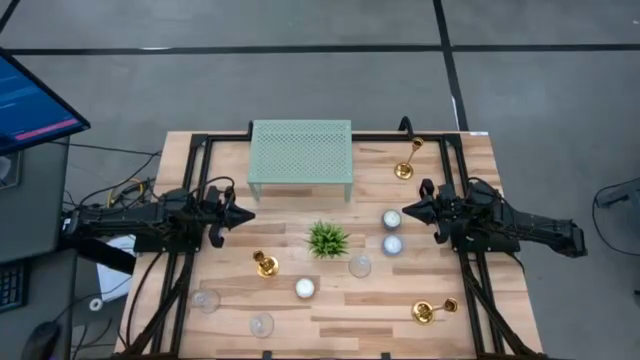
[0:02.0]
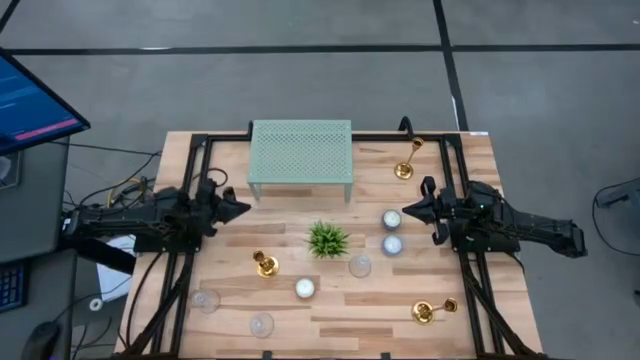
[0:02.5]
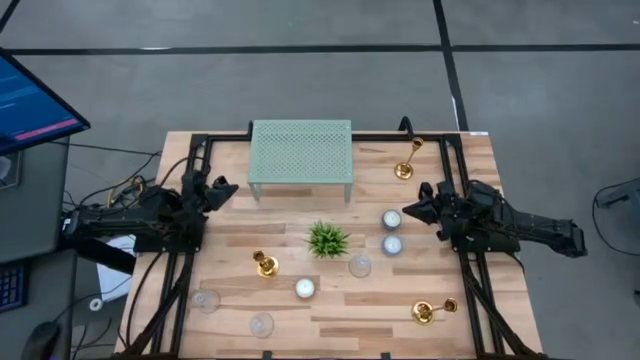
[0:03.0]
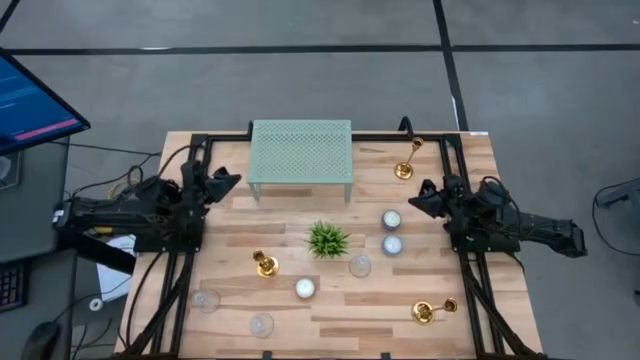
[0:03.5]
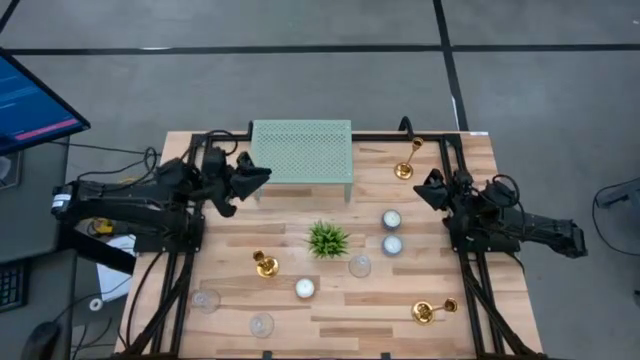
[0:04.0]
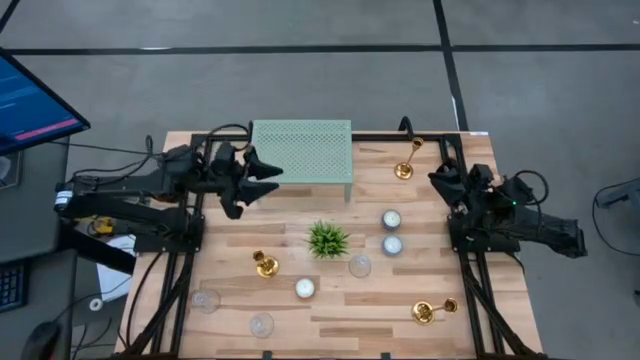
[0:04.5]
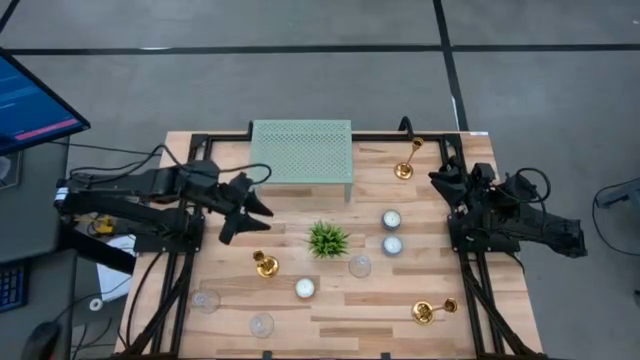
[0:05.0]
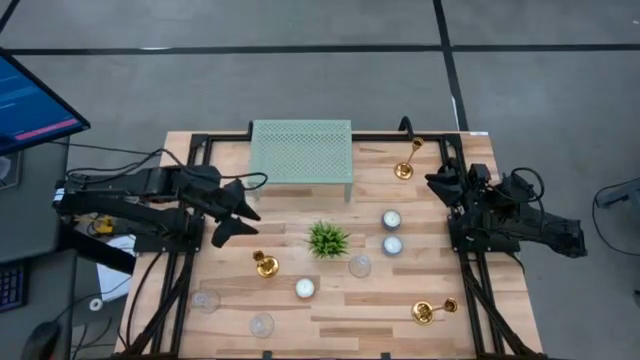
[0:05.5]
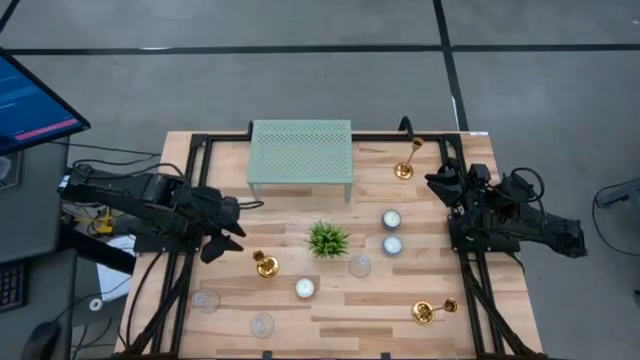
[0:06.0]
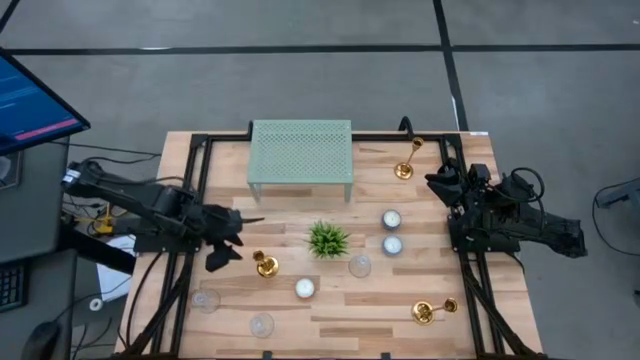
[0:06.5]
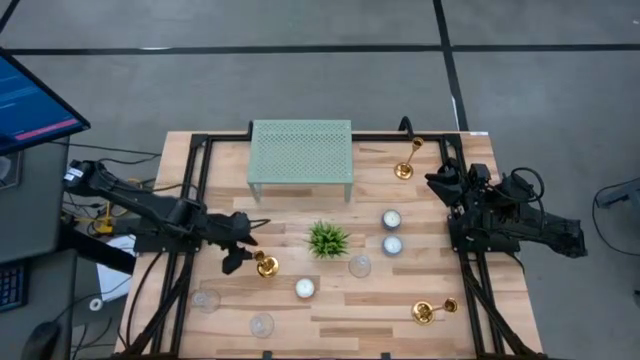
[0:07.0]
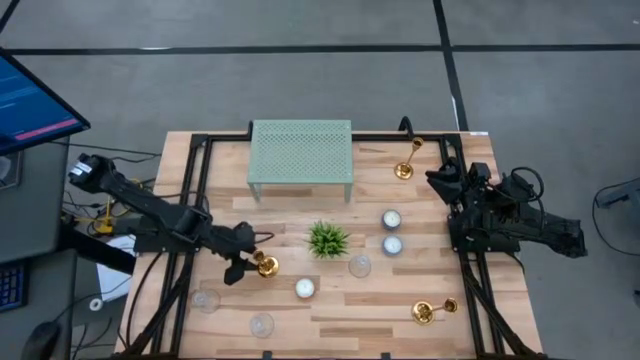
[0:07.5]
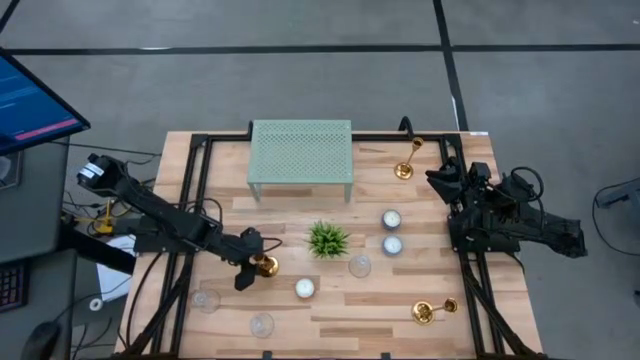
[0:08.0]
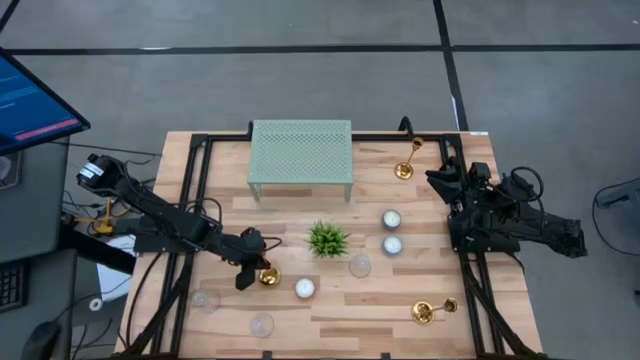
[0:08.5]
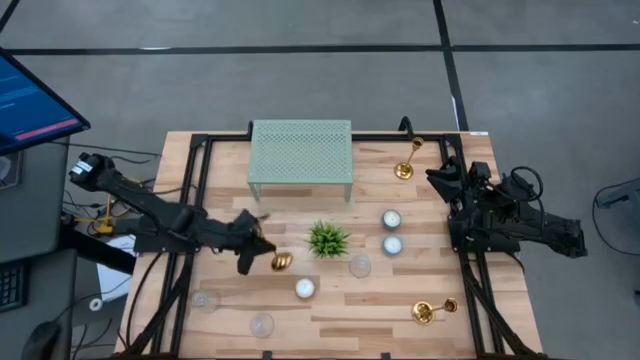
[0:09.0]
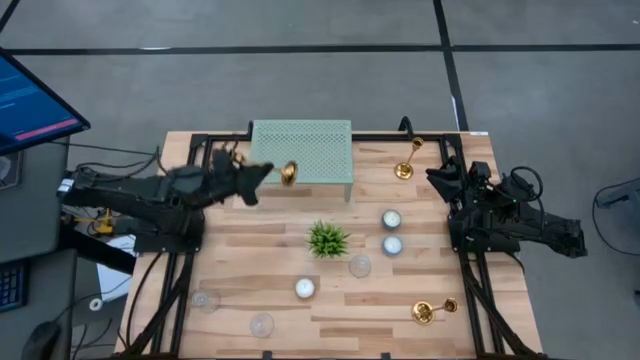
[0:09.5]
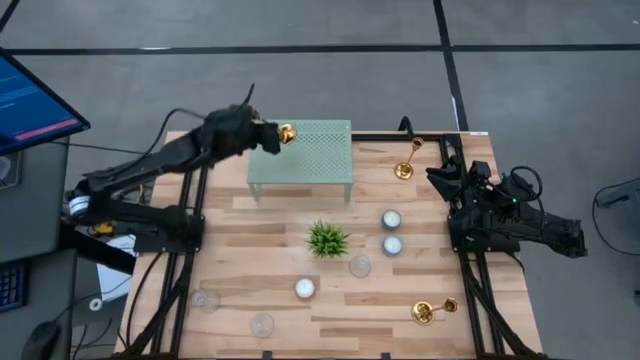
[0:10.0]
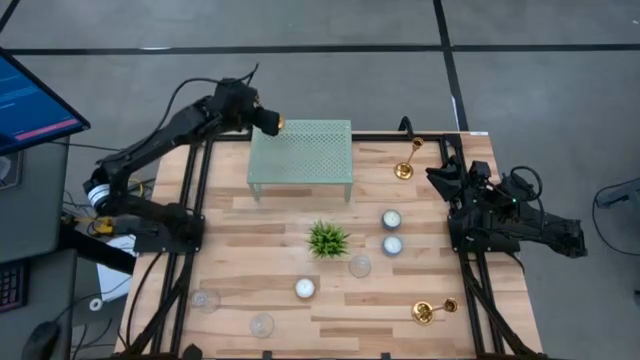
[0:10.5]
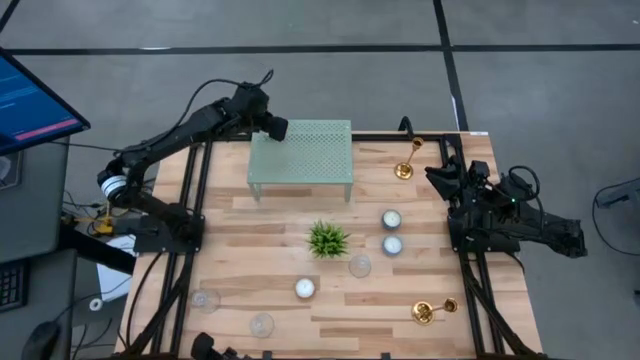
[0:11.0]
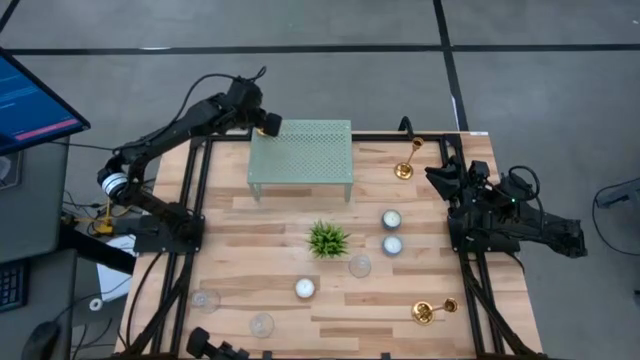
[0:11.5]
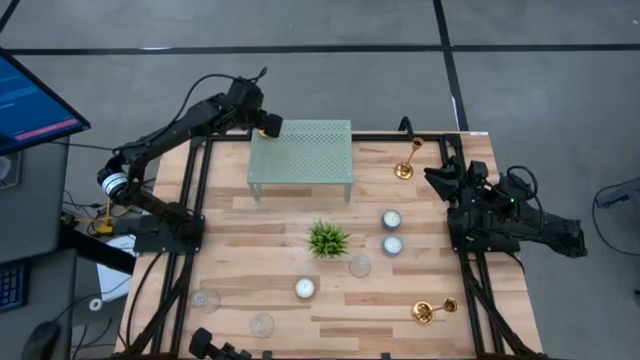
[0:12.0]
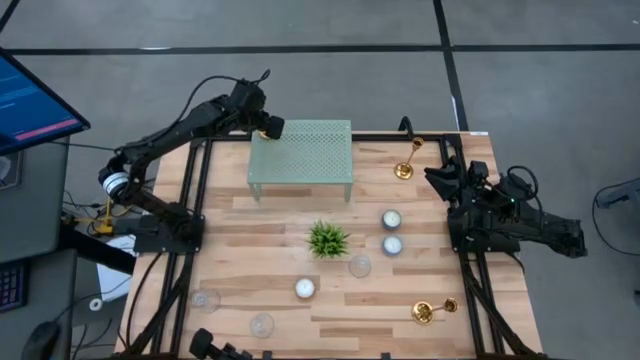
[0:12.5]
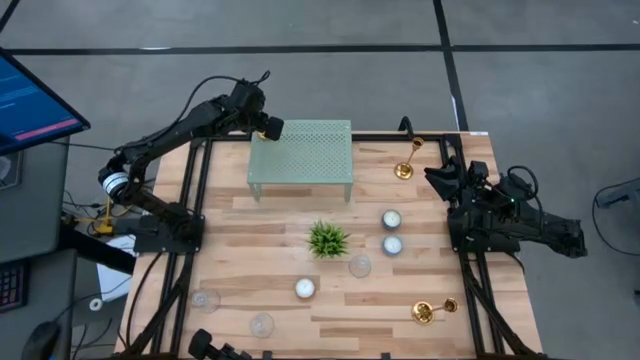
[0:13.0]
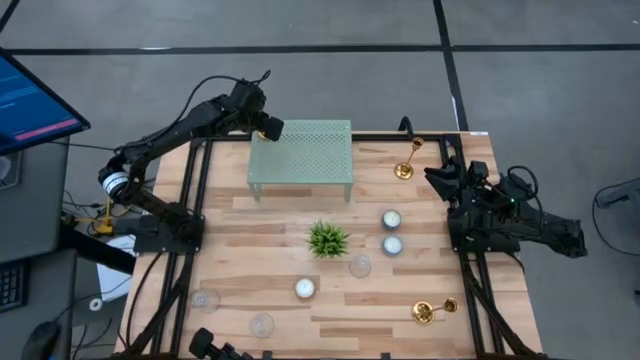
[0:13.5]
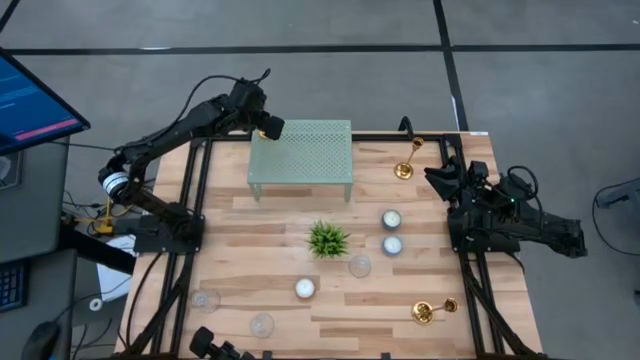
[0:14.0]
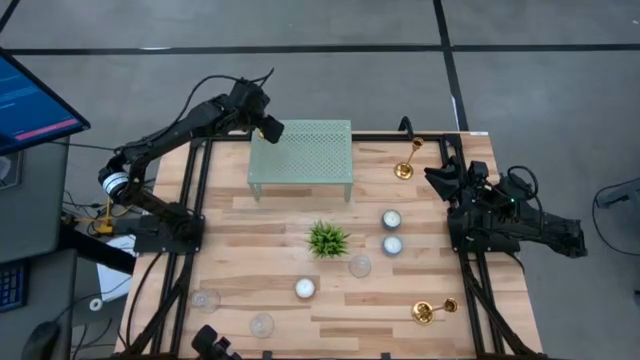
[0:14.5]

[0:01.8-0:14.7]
Task: Pick & Place candle stick holders
Put the middle left gold candle holder on the shelf

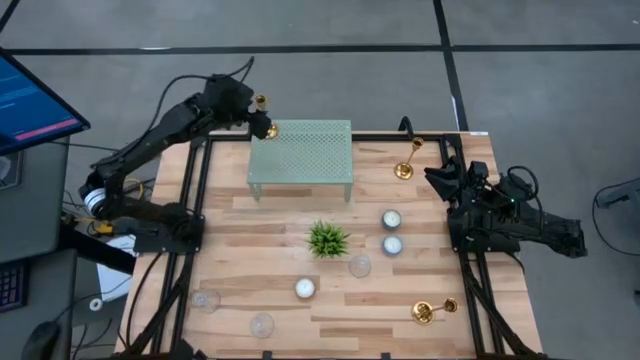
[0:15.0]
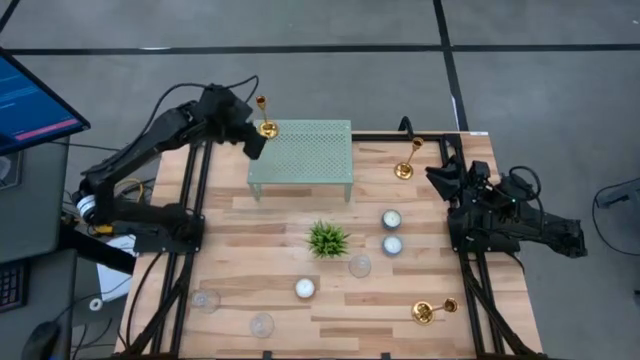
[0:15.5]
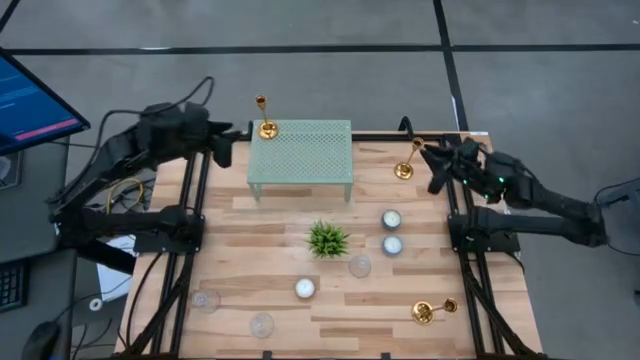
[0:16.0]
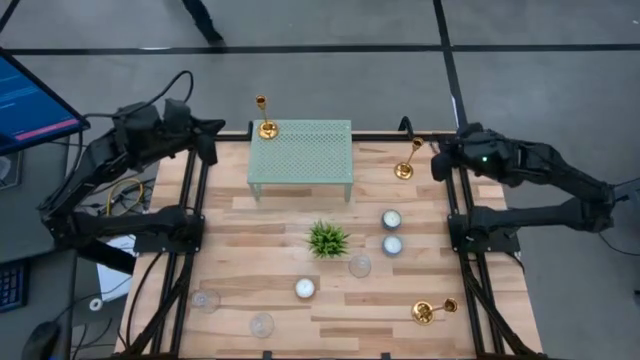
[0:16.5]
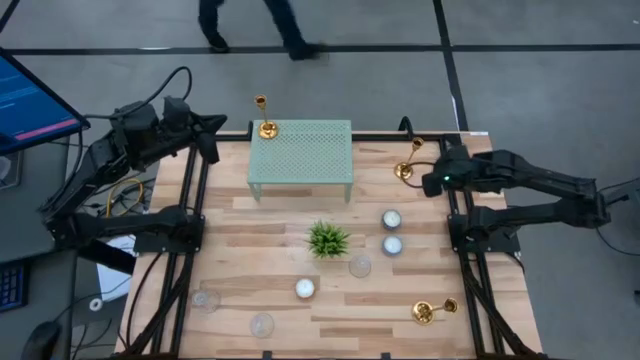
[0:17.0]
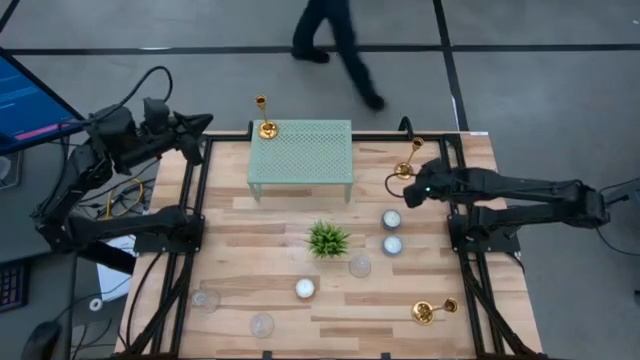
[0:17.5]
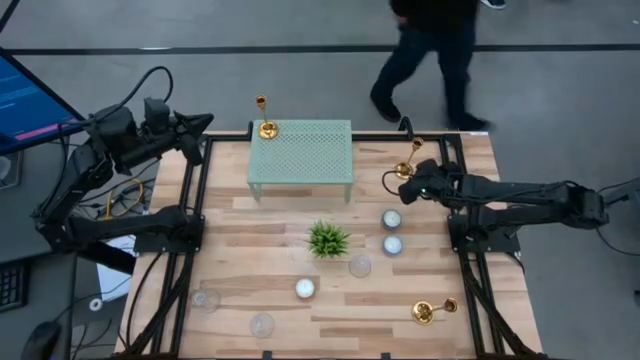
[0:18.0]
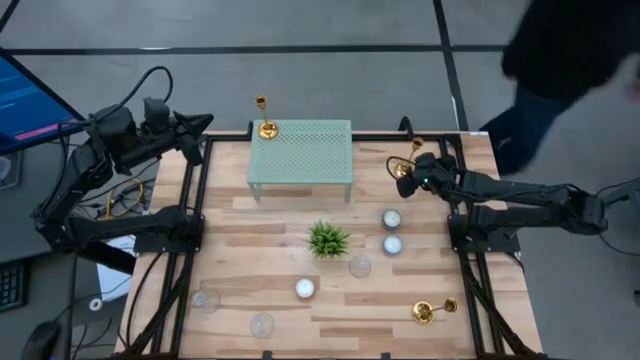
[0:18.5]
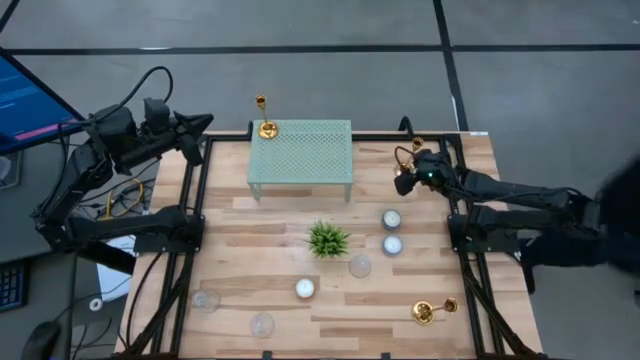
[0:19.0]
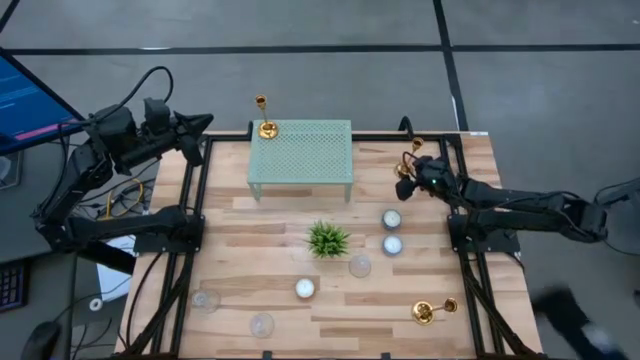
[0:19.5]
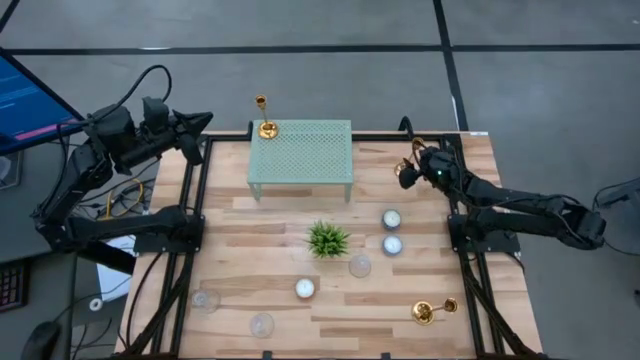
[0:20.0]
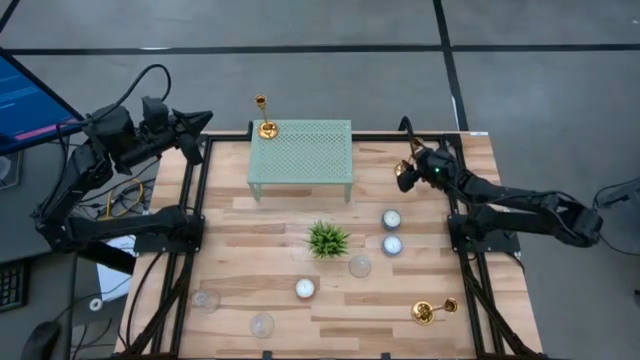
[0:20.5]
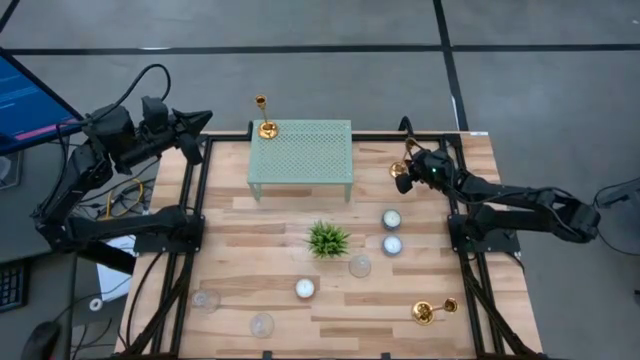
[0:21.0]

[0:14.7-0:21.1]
Put the top gold candle holder on the shelf aligned with the other gold candle holder
